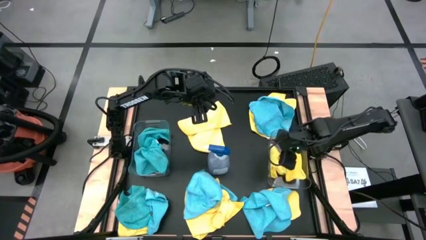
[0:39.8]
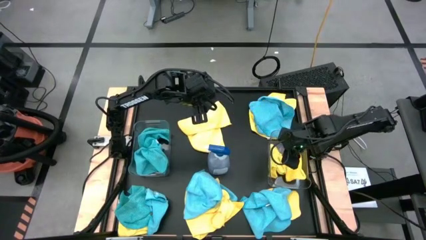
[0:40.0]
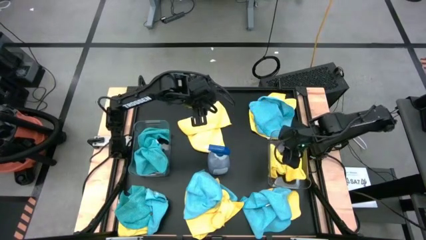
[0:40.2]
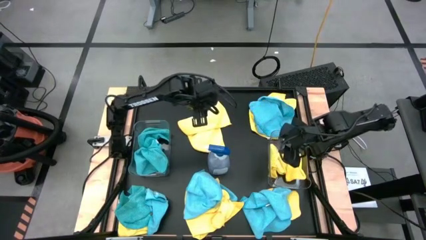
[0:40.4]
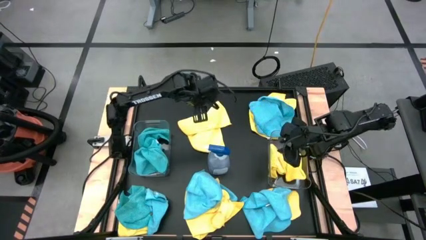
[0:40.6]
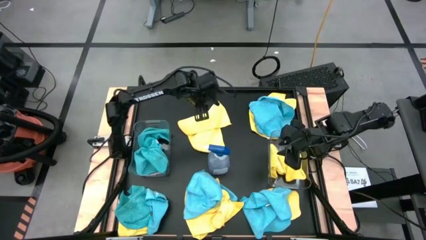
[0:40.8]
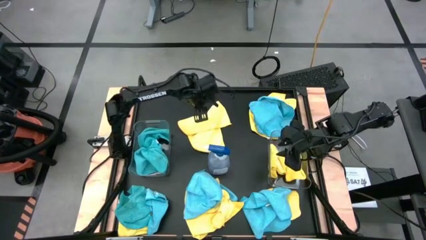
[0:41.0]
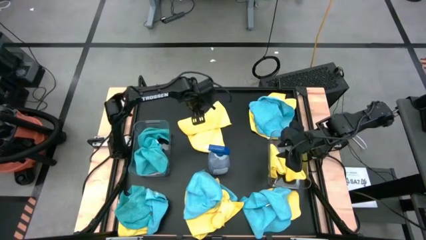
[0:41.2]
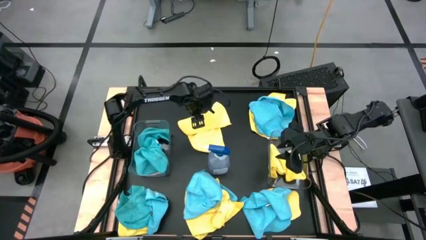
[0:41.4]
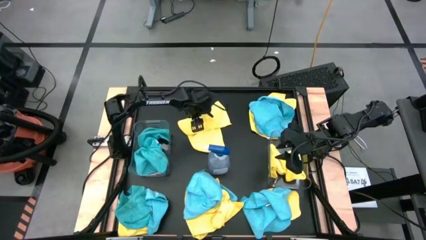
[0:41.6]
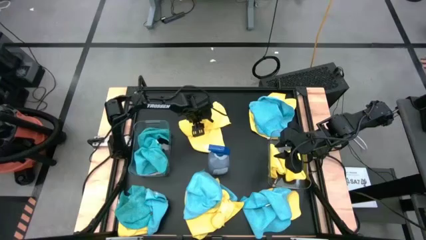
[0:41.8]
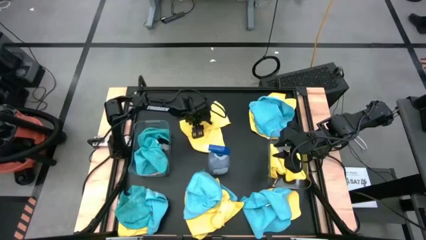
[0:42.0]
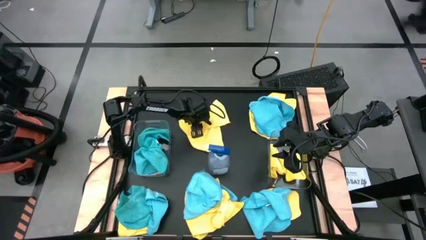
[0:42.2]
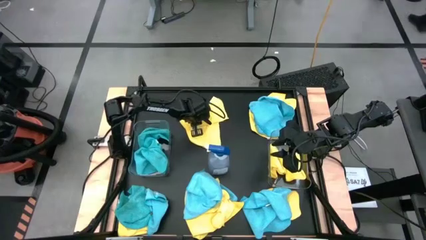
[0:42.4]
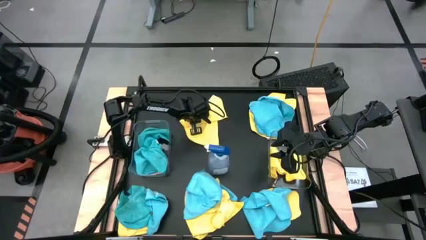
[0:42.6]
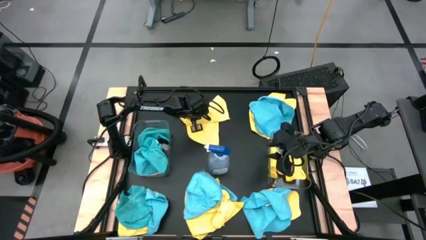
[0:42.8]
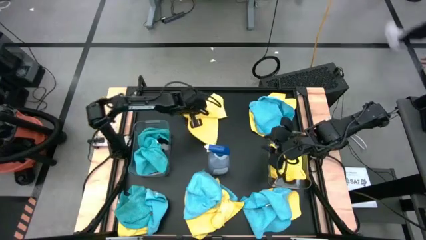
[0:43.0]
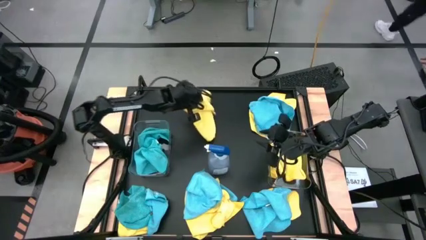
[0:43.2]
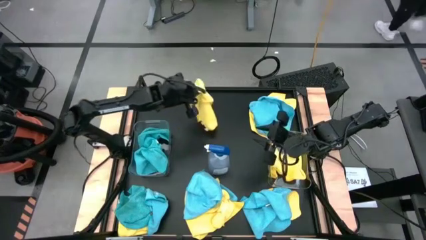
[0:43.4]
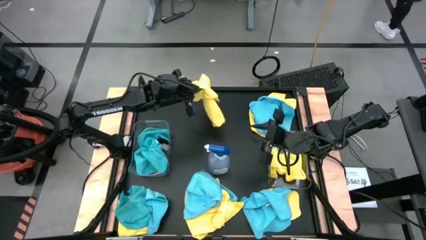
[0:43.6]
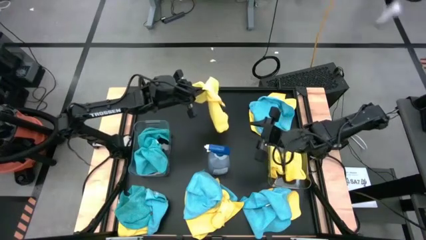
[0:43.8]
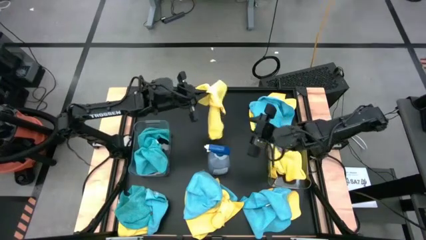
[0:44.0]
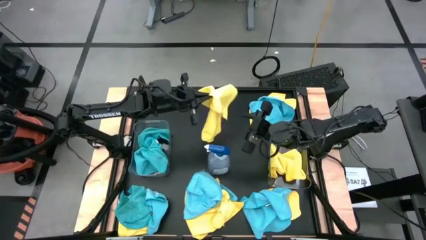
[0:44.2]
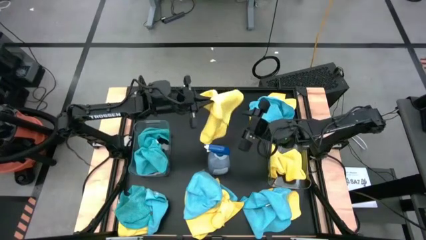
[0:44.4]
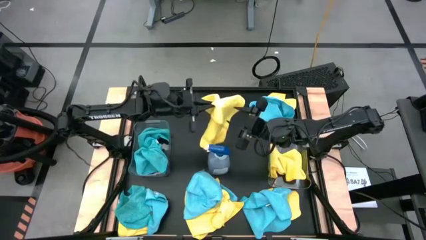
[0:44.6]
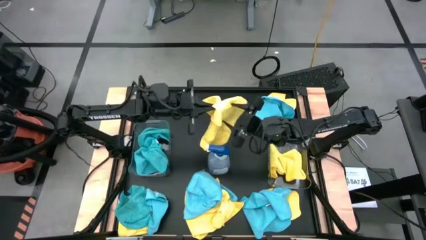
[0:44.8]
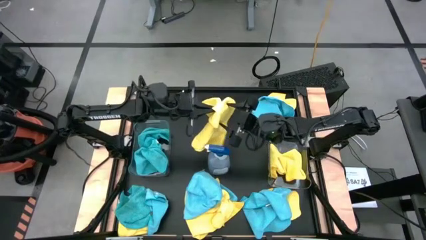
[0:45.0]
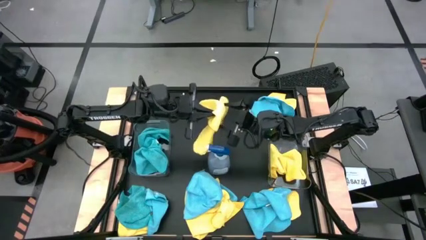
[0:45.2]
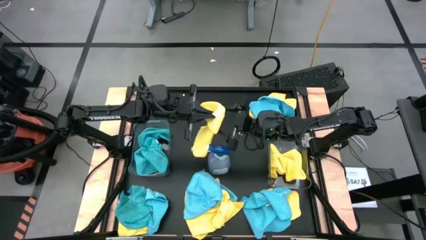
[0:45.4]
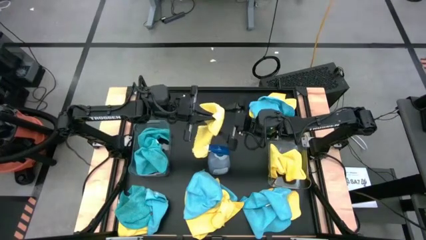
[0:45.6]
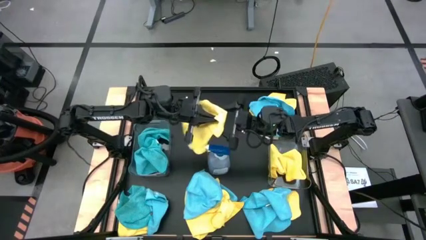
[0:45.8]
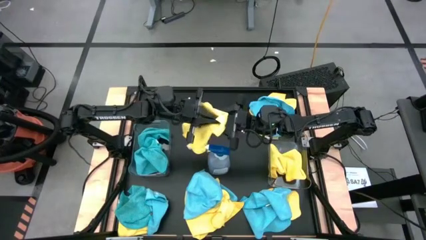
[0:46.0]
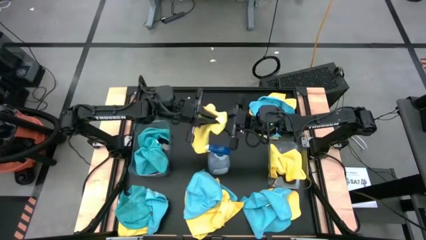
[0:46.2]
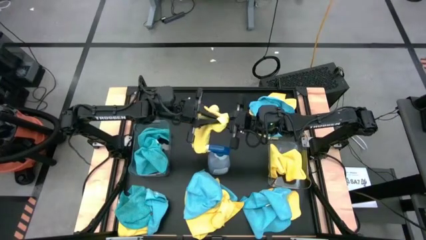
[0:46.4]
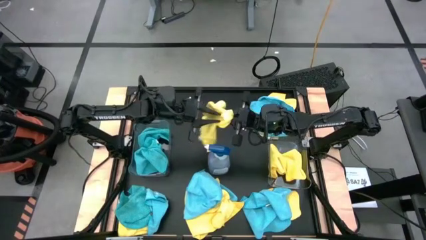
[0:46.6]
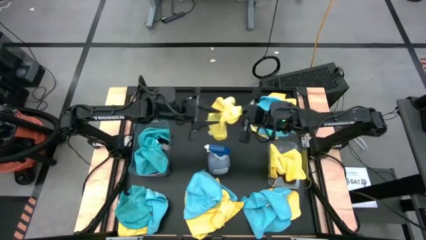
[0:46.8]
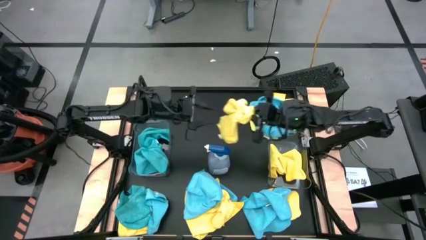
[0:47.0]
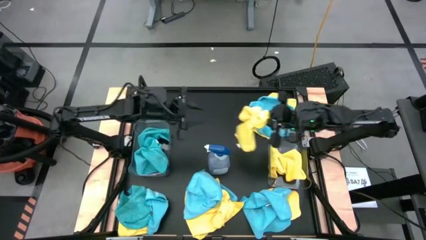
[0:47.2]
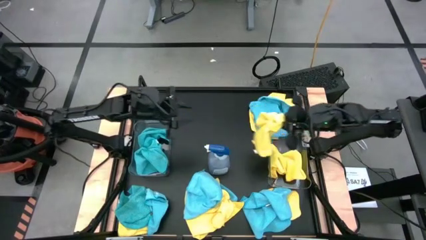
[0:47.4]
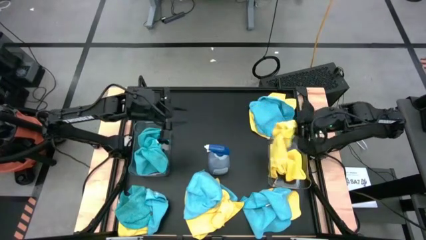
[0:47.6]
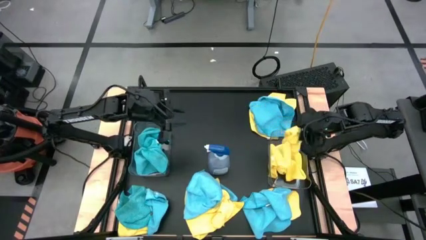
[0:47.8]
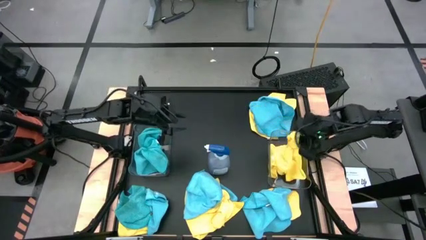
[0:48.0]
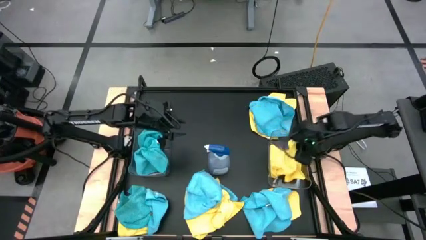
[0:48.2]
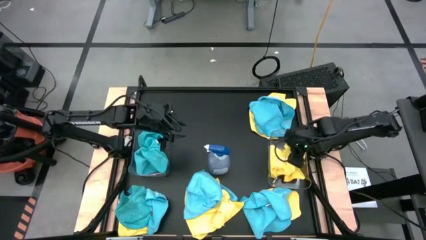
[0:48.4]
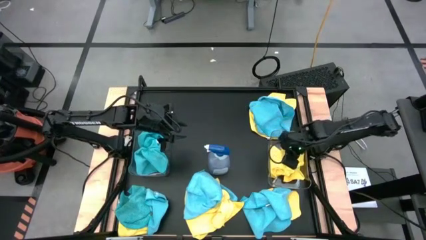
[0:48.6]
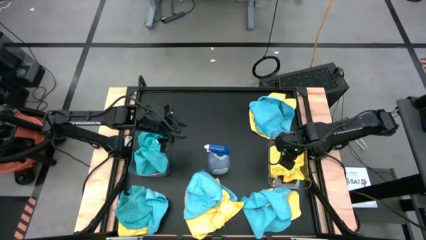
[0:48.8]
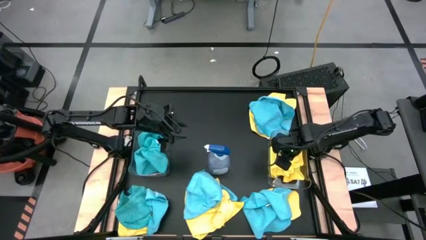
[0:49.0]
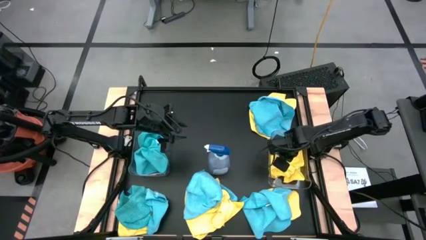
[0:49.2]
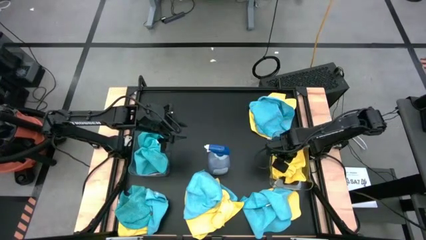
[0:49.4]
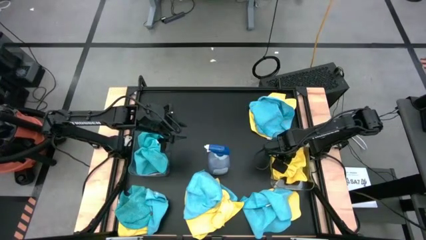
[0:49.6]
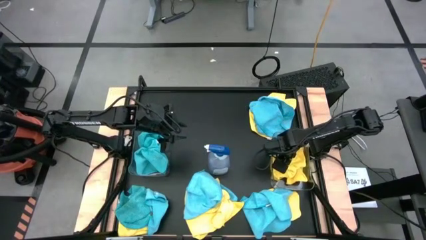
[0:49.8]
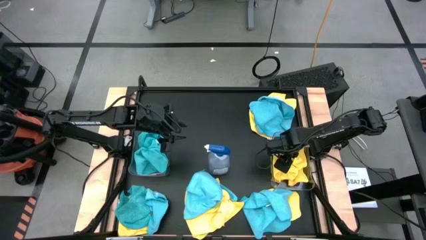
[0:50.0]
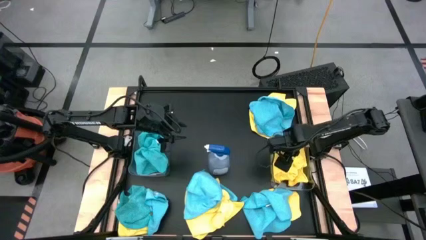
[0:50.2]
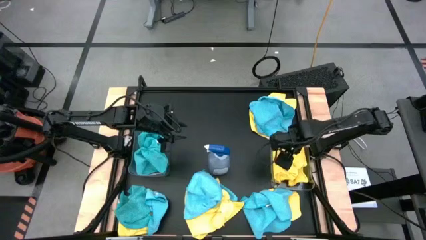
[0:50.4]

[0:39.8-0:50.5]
Task: Sort microfiber towel by color & place in baskets
Put the yellow microfiber cloth into the right transparent bin

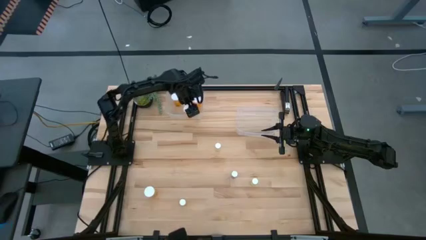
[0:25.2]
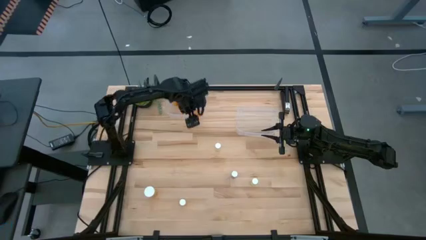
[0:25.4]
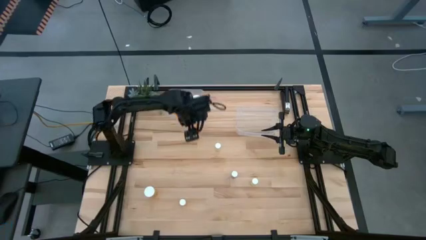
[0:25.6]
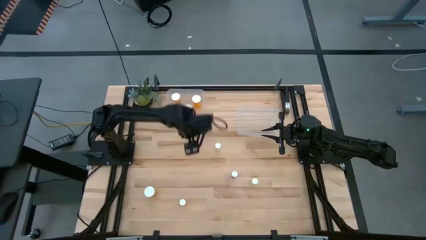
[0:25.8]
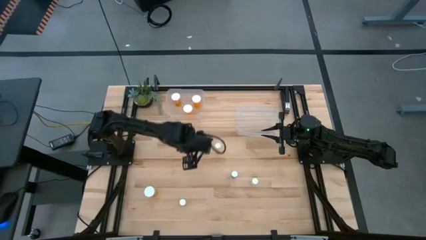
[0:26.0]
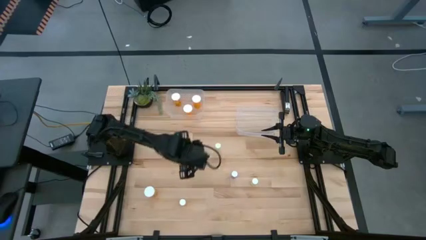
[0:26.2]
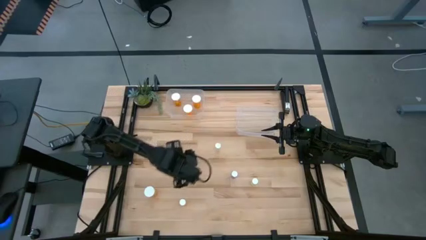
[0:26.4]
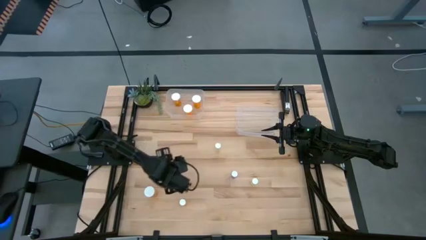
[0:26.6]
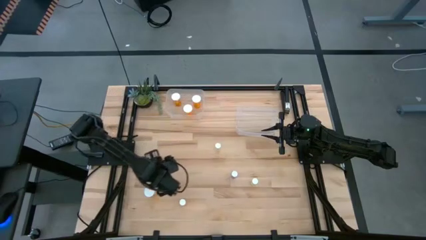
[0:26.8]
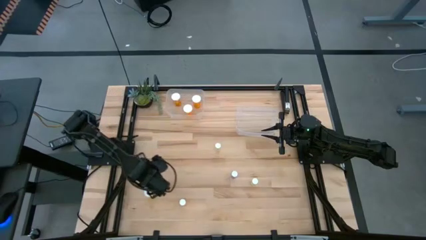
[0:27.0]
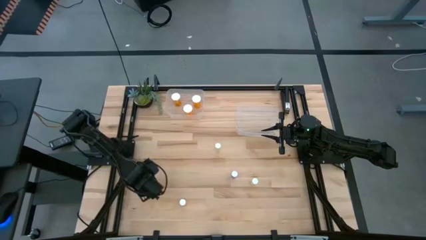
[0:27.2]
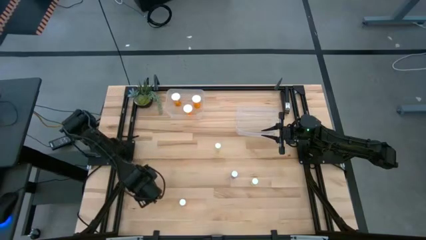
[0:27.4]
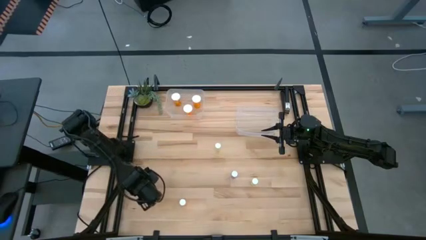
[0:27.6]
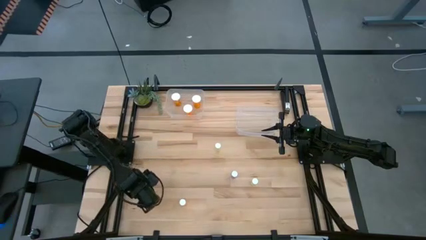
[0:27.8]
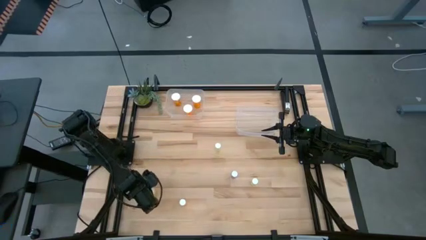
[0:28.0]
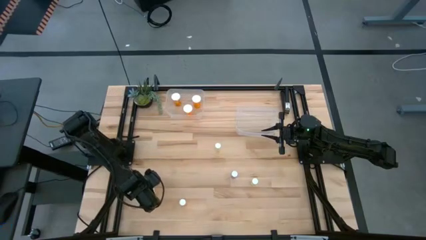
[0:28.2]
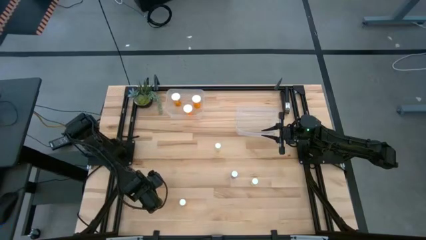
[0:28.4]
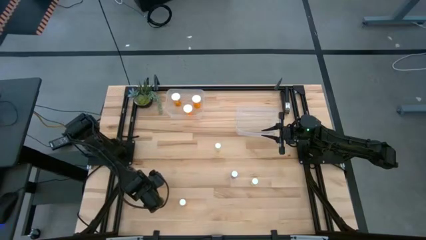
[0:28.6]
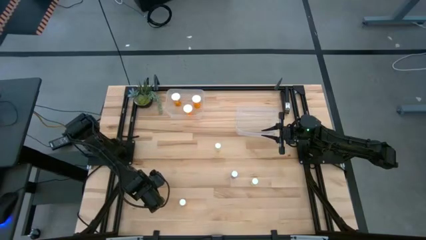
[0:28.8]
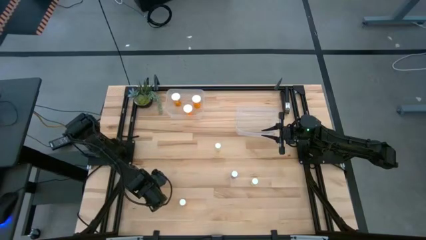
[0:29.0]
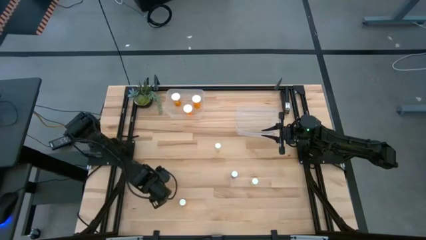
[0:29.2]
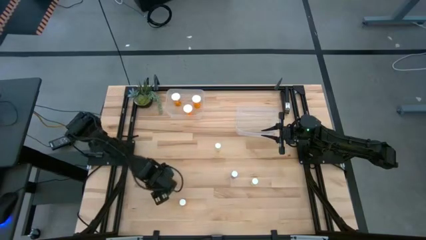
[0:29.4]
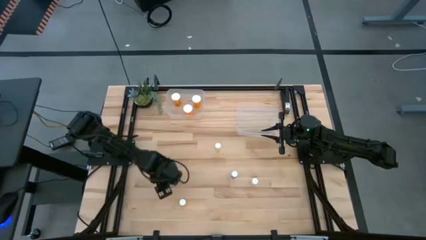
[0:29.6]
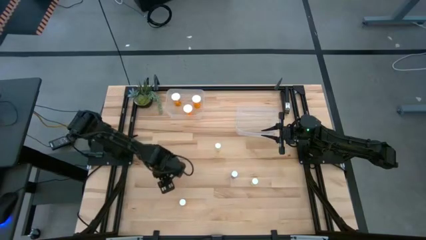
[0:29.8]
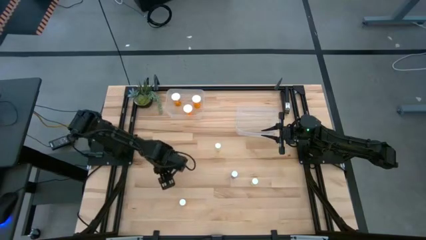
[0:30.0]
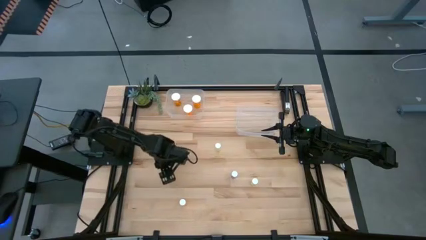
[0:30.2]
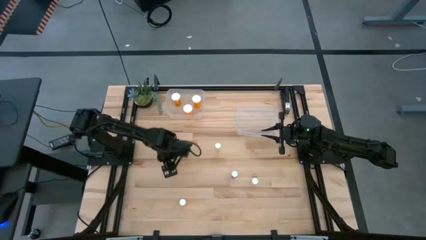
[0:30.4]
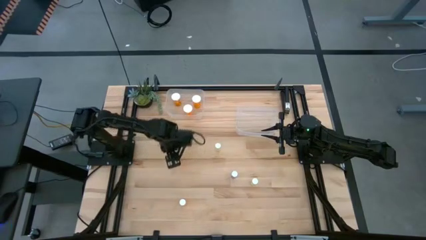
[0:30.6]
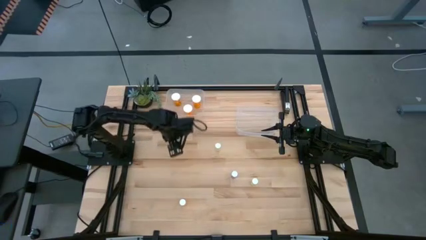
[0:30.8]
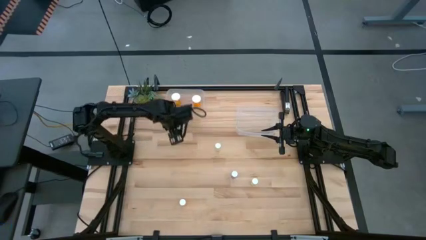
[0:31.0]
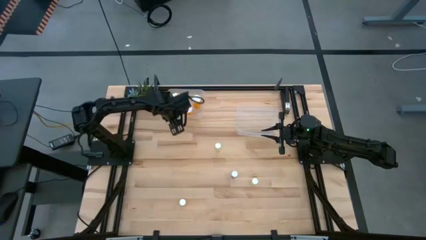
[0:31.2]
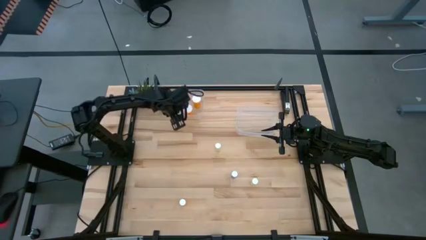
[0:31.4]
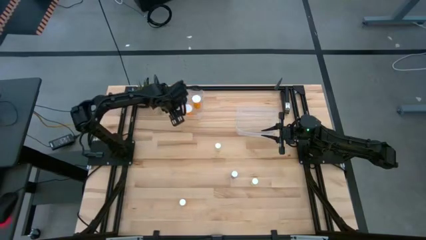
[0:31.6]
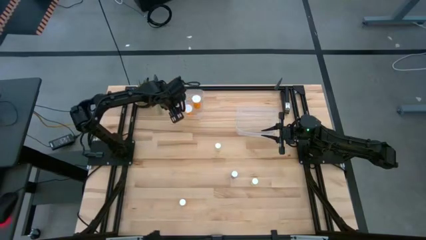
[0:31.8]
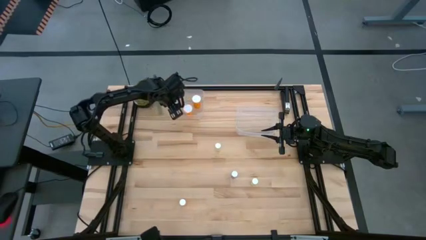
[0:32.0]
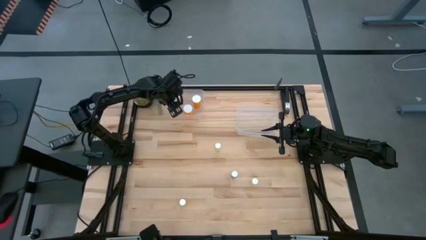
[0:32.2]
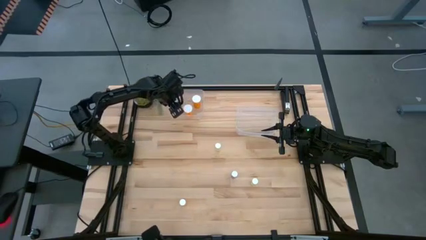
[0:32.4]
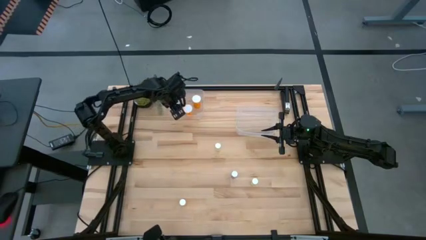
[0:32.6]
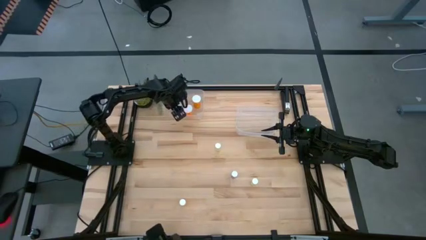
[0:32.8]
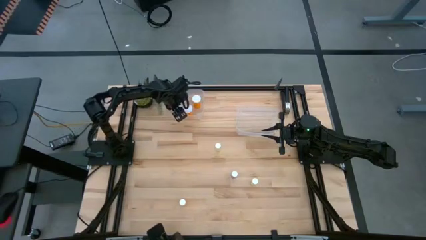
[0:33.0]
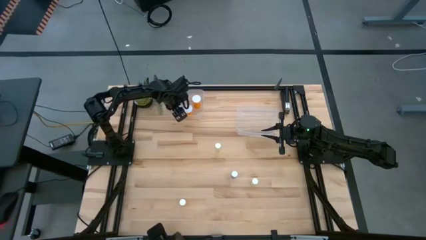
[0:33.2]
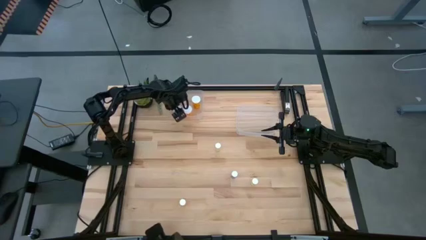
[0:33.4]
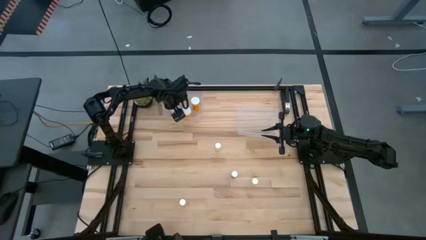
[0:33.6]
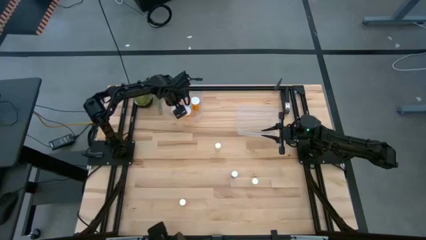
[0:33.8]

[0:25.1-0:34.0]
Task: Pick and place medicine bottles into bin by pill shape (circle, oval)
Put the large orange pill bottle into the left transparent bin
